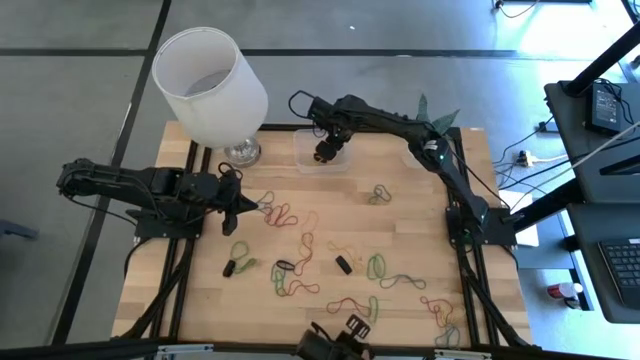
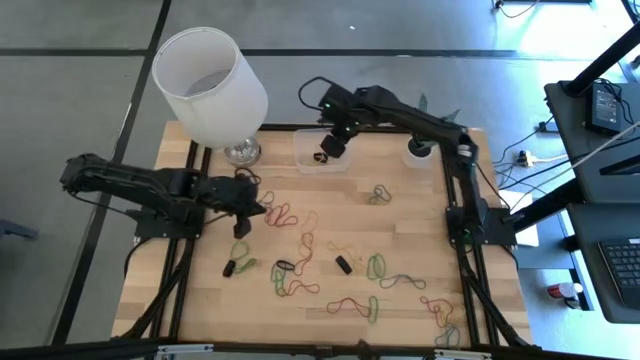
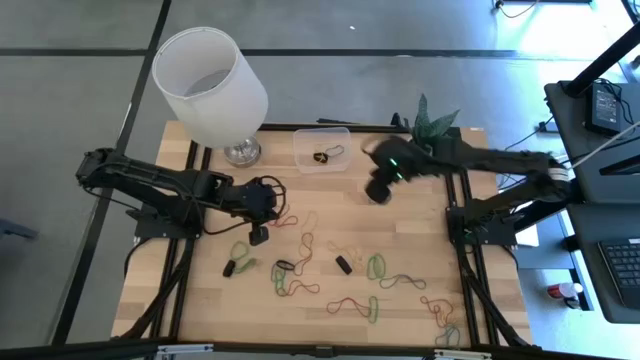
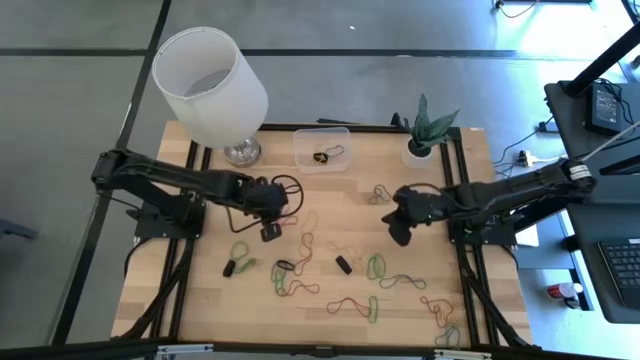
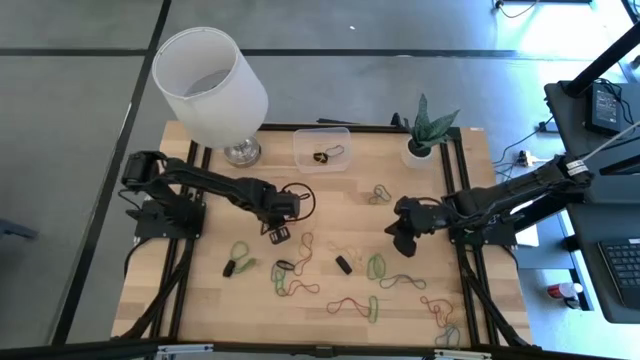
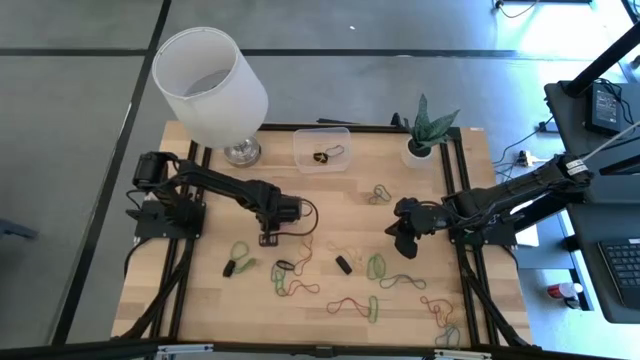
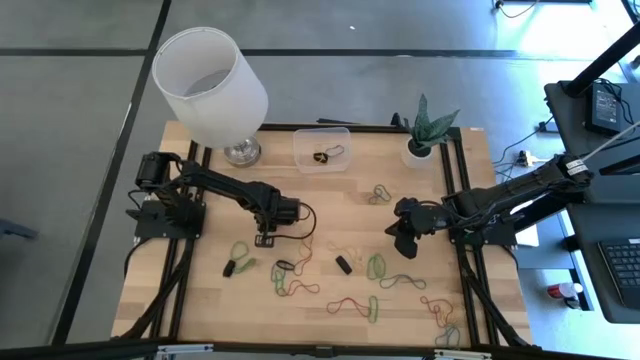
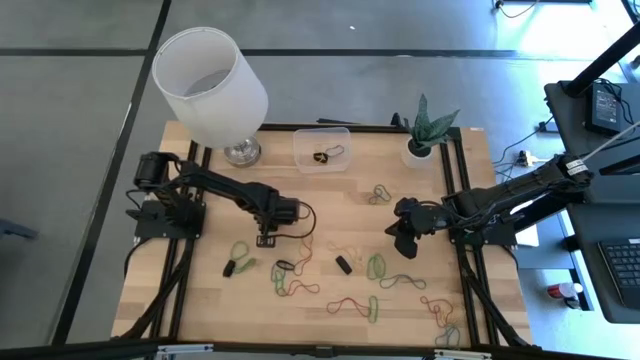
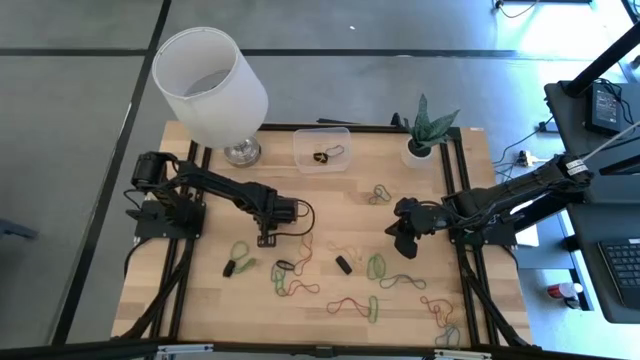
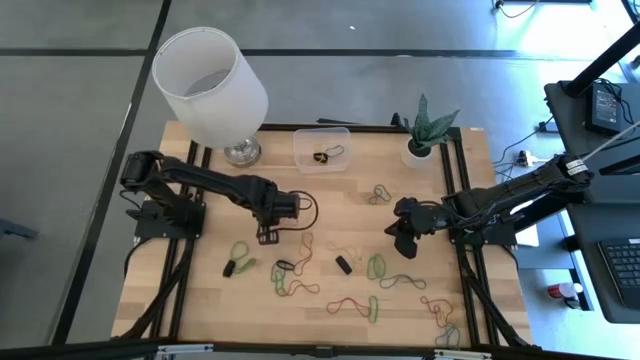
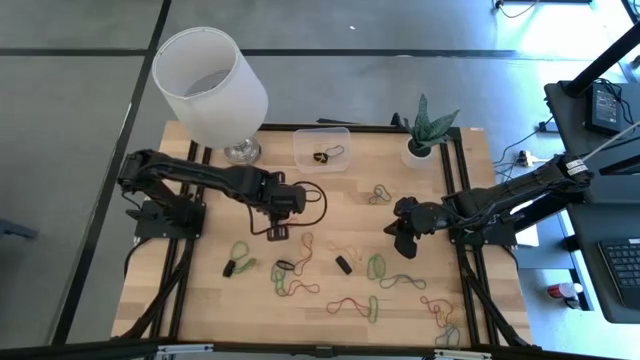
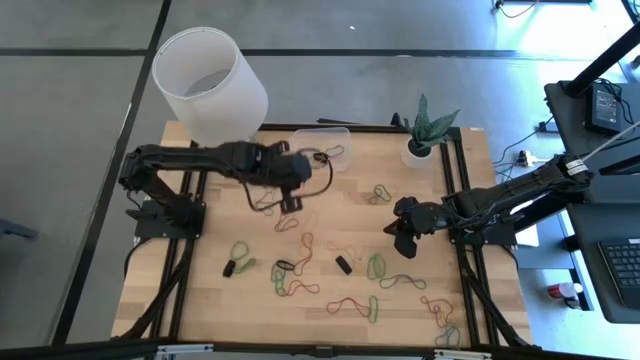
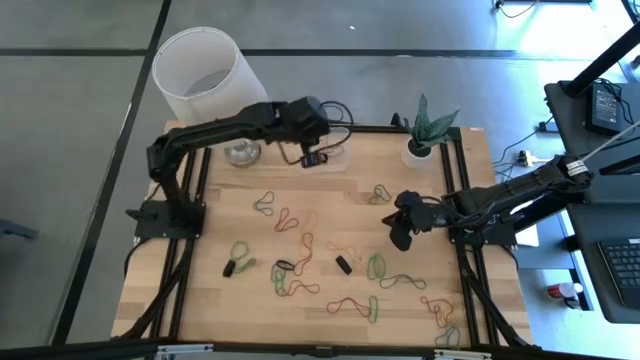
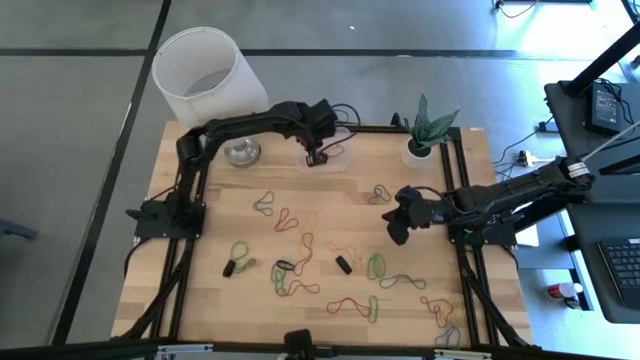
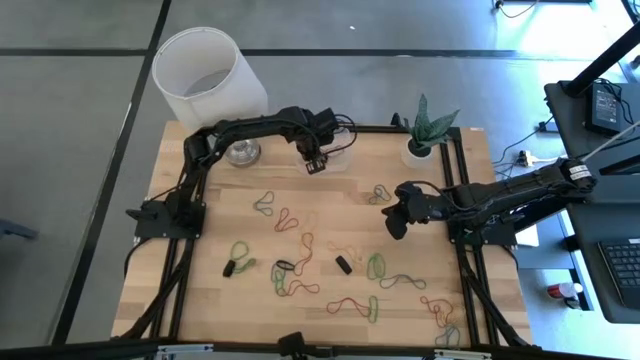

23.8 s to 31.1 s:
Task: Pick and place rubber bands into bin
Put the red rubber band into the transparent bin

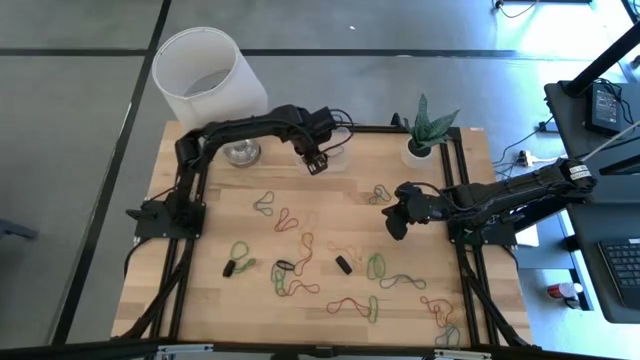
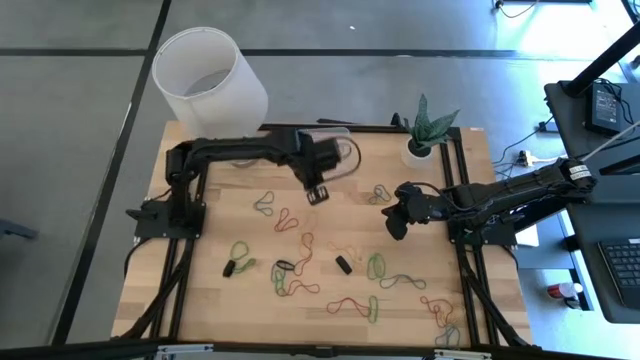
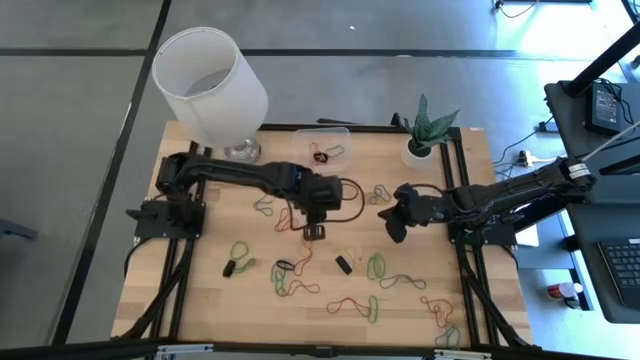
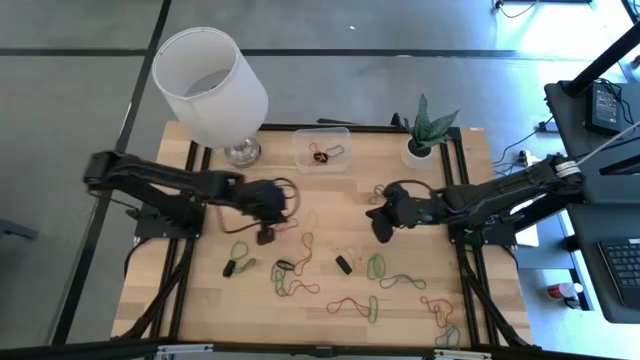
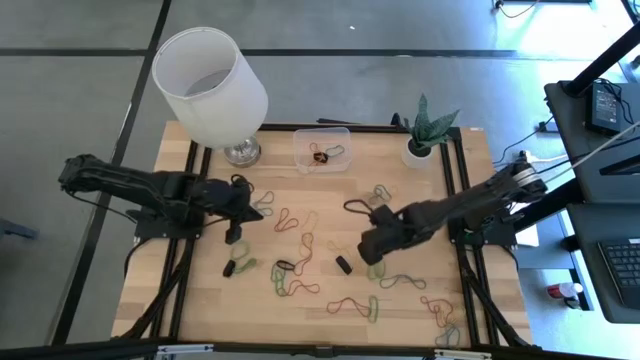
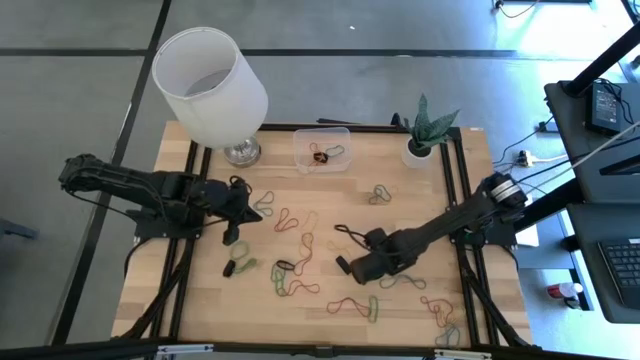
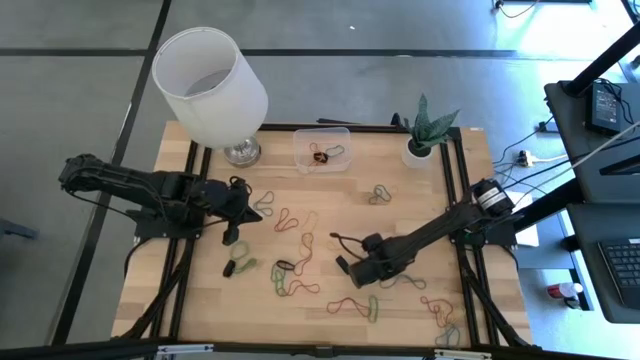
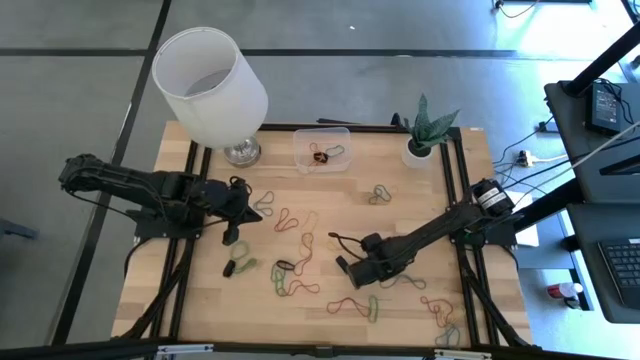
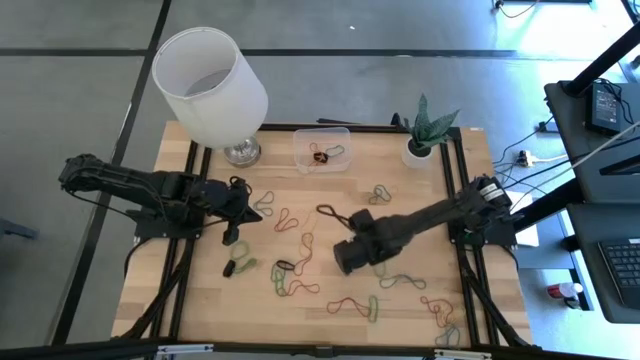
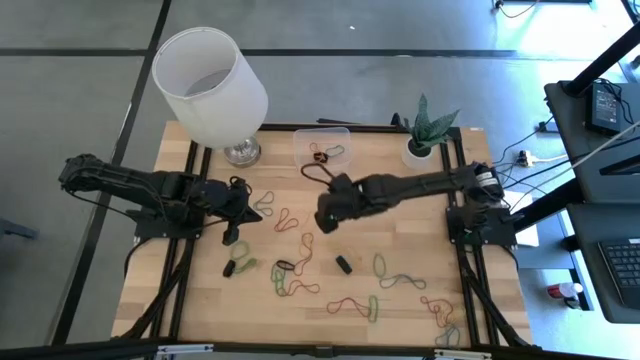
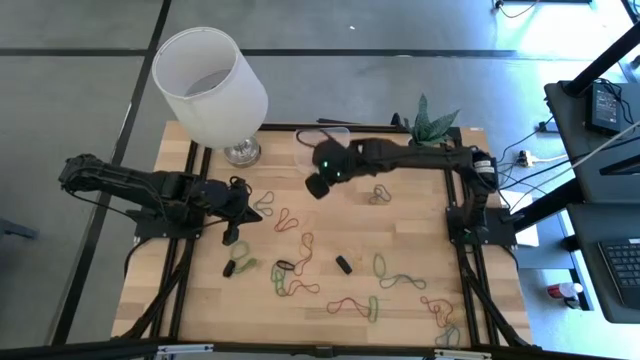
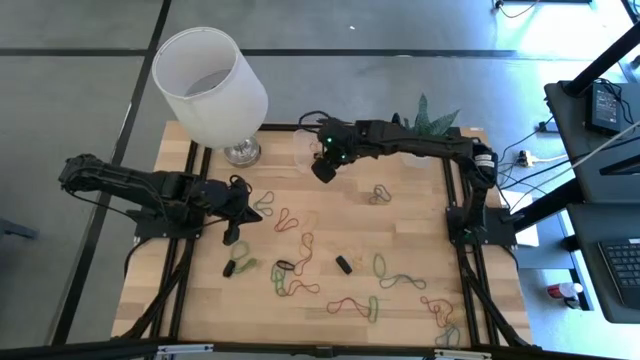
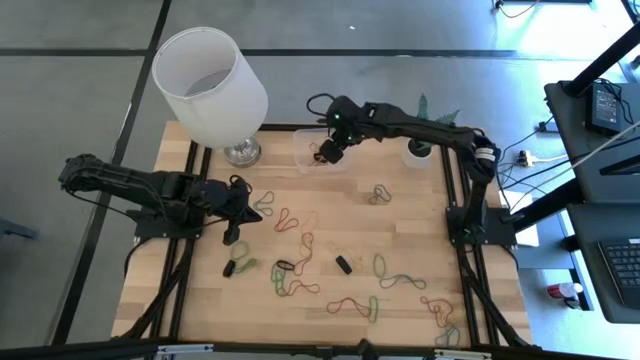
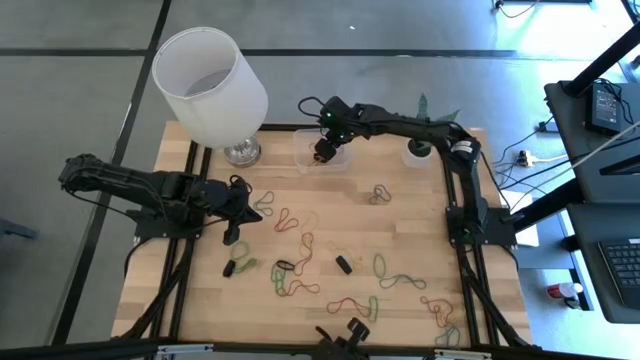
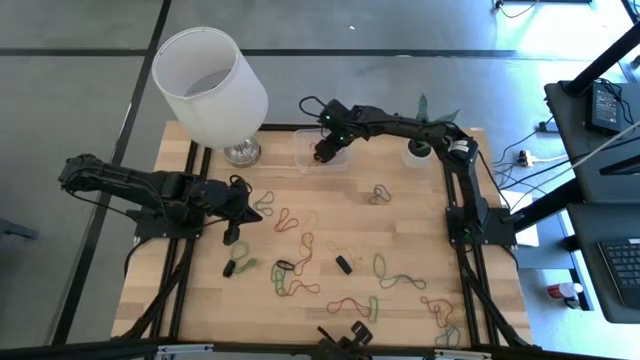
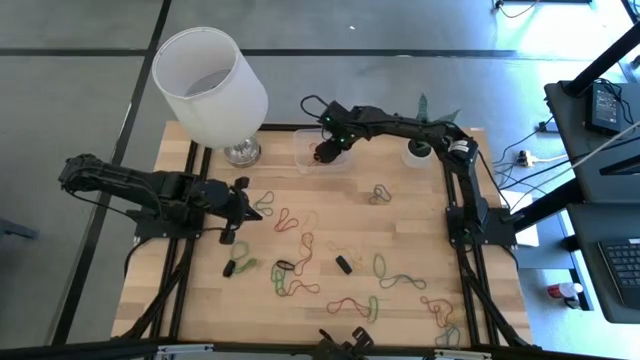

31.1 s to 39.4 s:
Put the green rubber band into the transparent bin

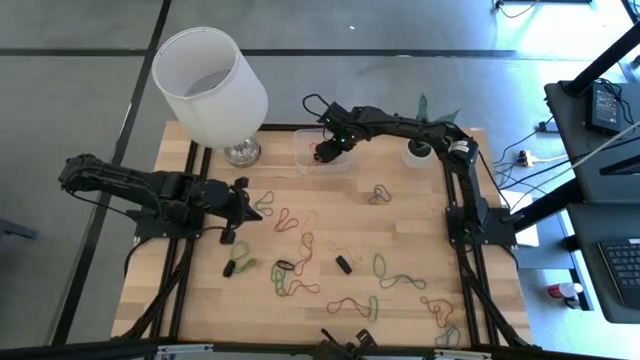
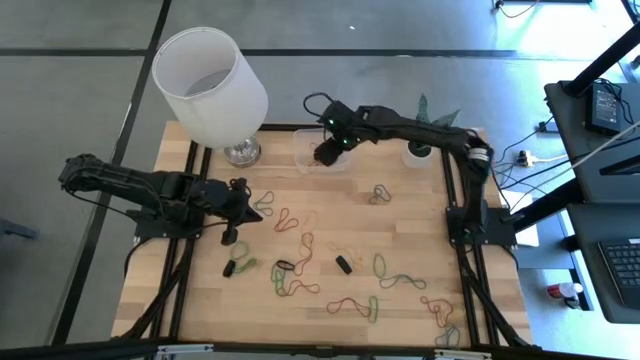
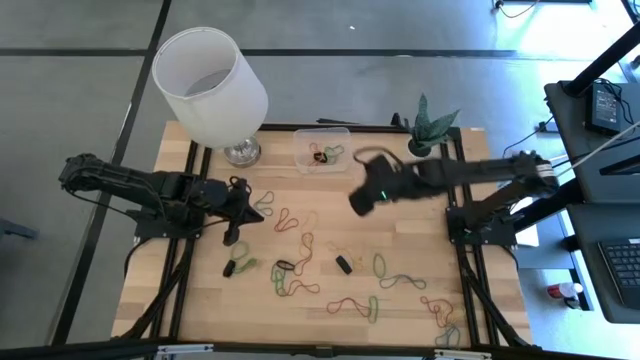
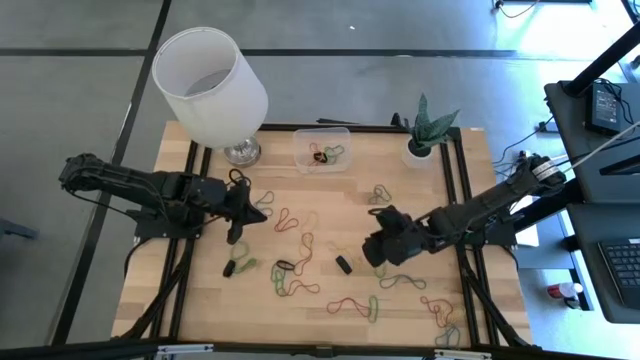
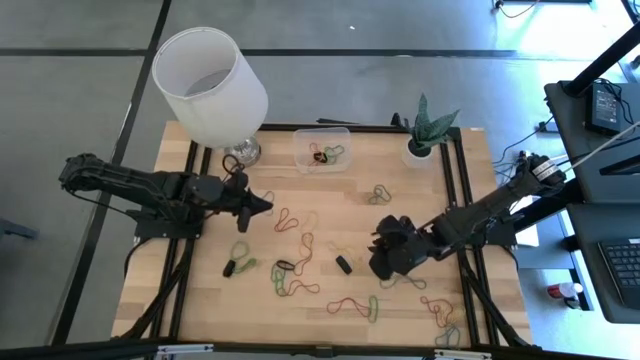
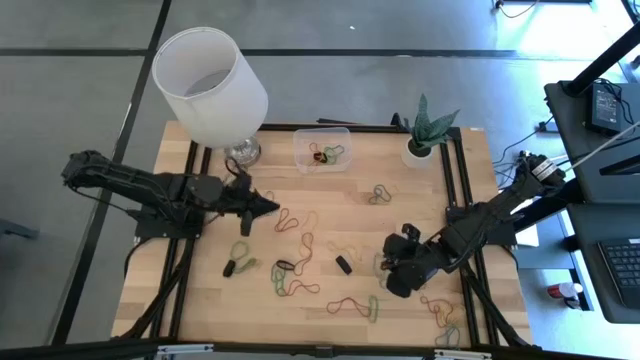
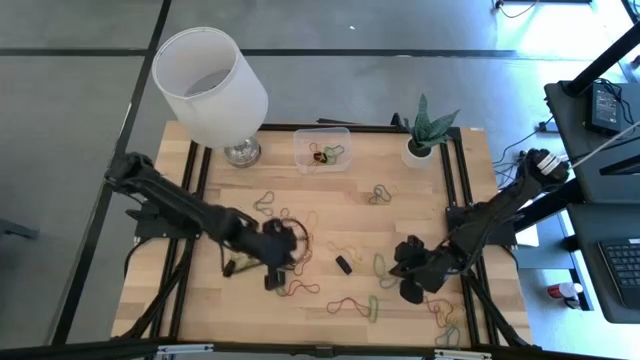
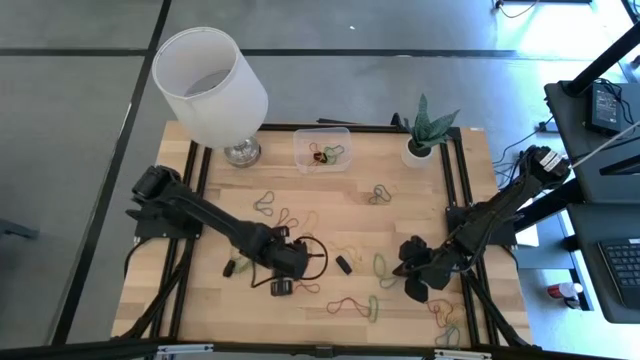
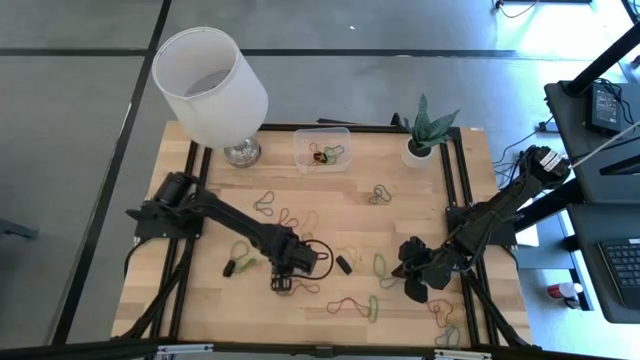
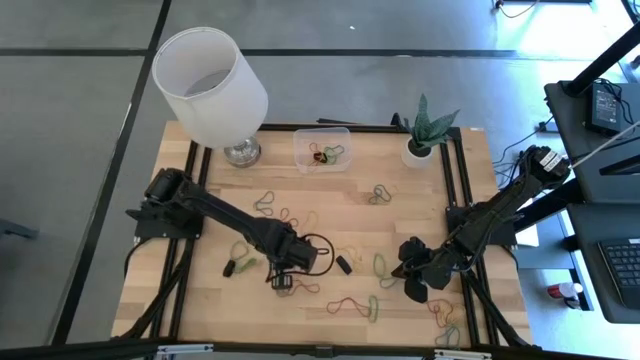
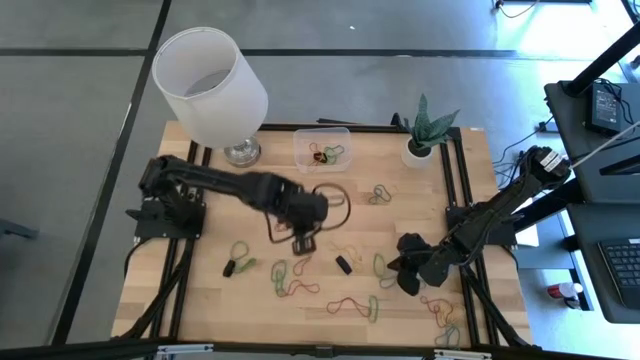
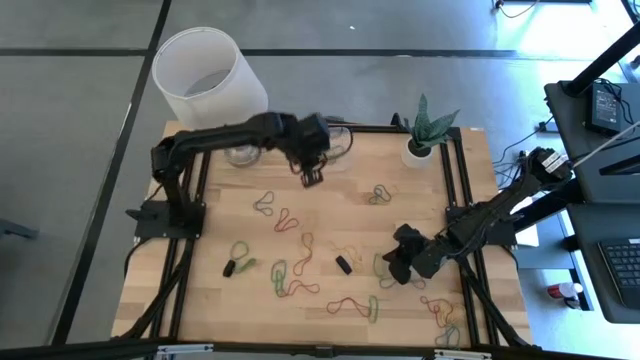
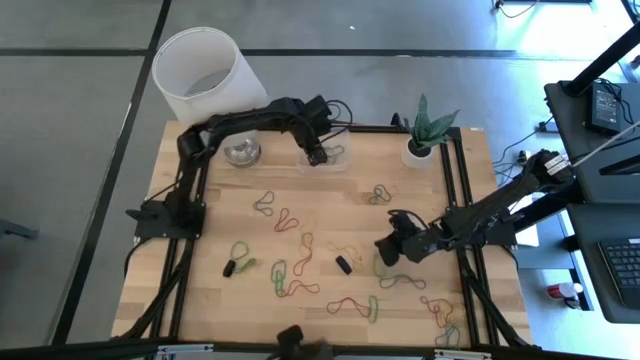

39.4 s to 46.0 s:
Put the middle black rubber band into the transparent bin
